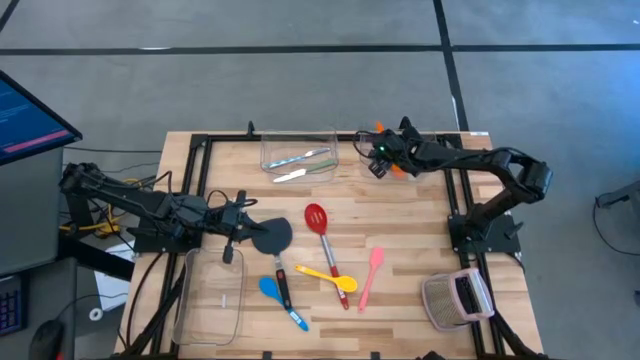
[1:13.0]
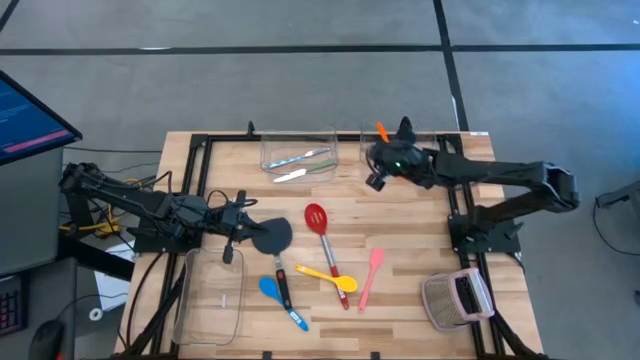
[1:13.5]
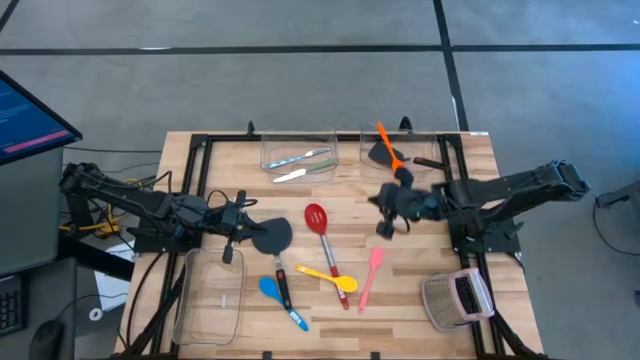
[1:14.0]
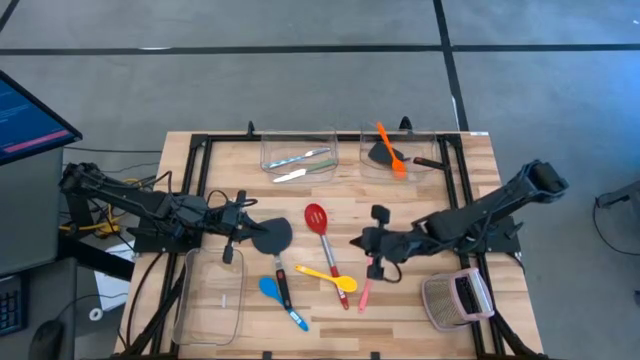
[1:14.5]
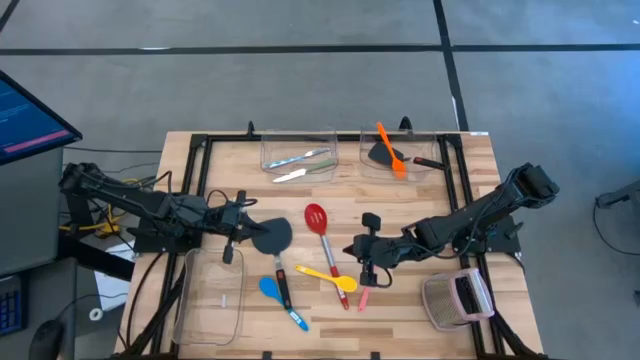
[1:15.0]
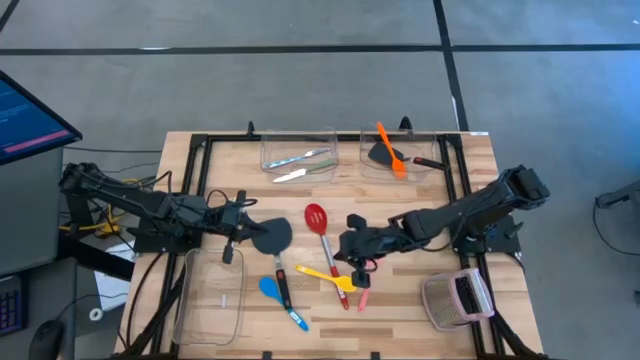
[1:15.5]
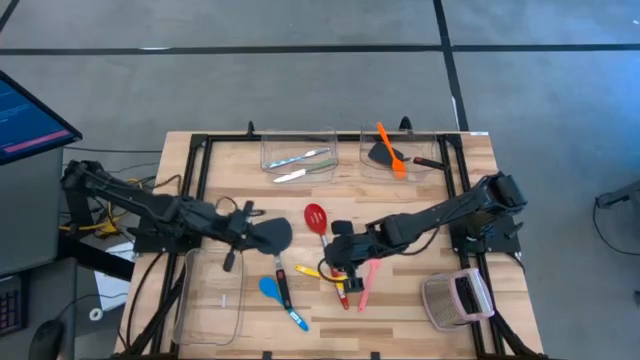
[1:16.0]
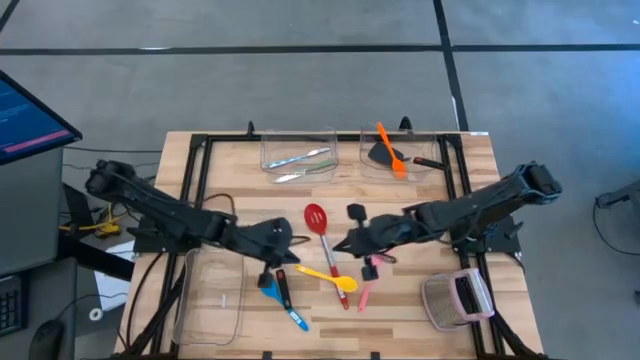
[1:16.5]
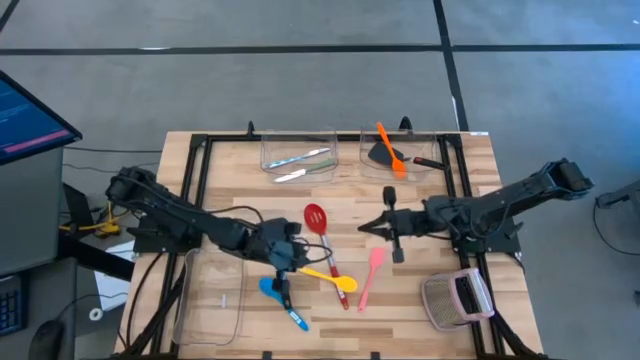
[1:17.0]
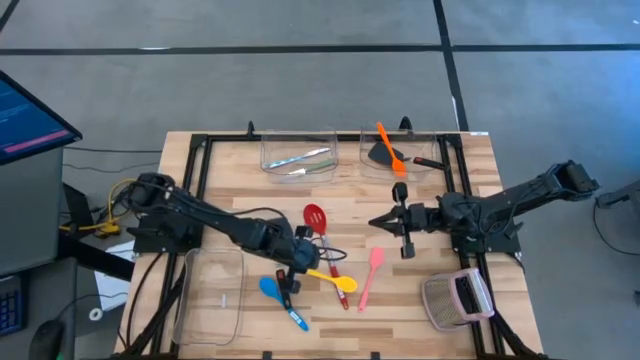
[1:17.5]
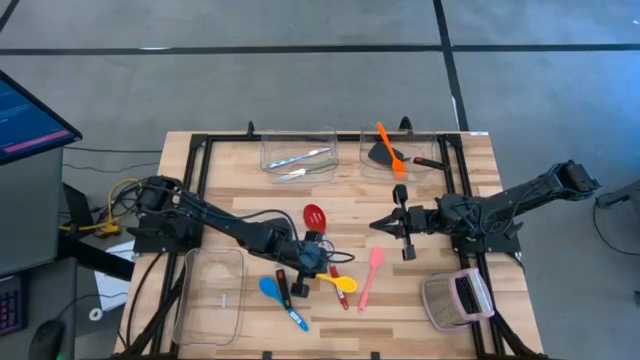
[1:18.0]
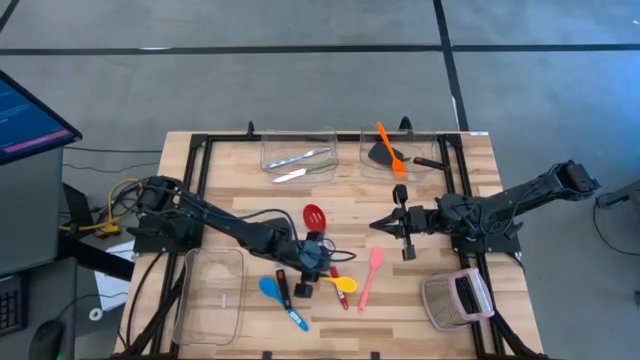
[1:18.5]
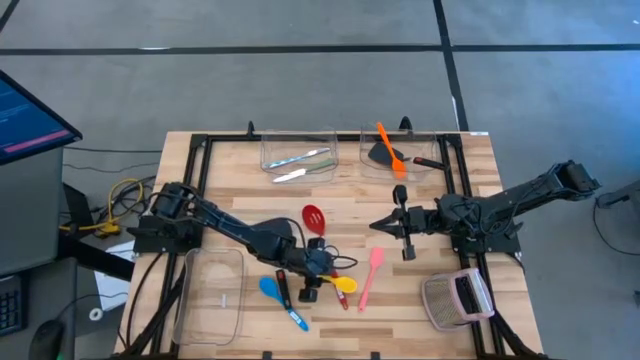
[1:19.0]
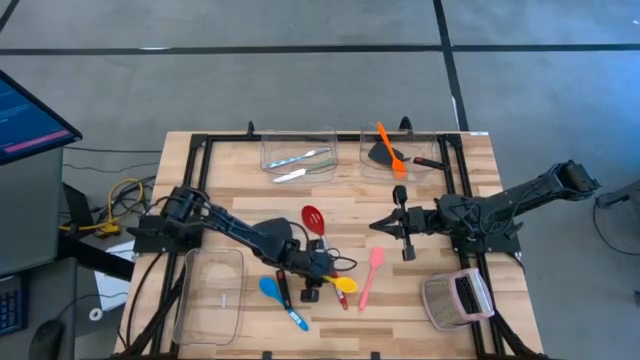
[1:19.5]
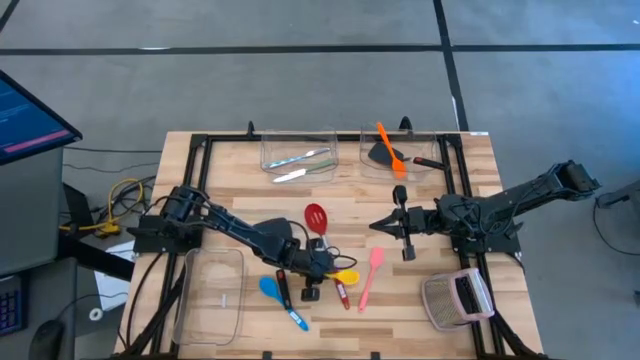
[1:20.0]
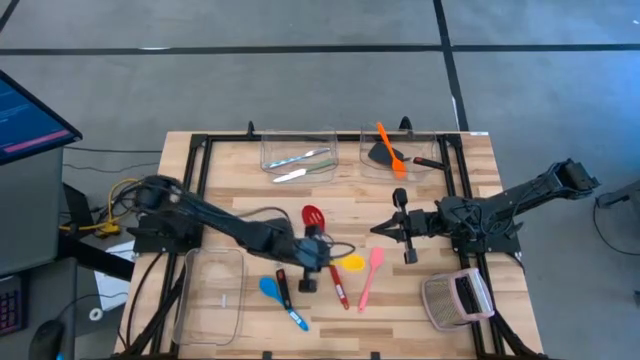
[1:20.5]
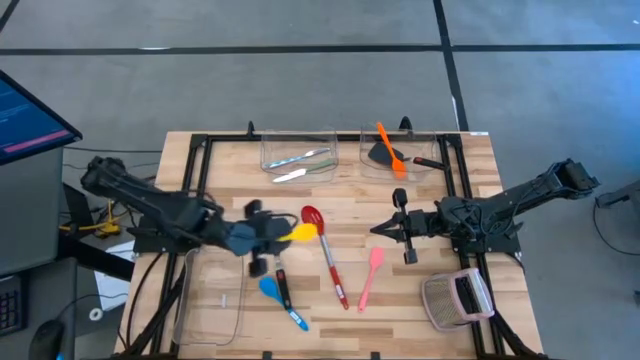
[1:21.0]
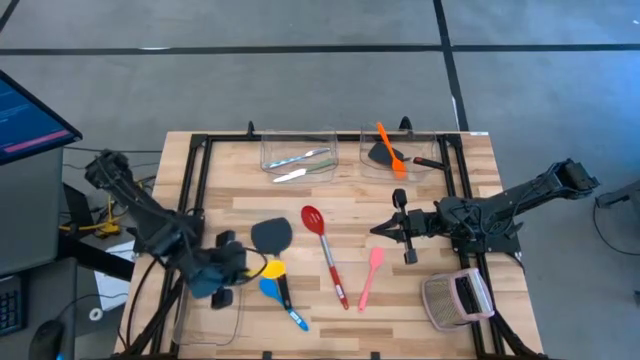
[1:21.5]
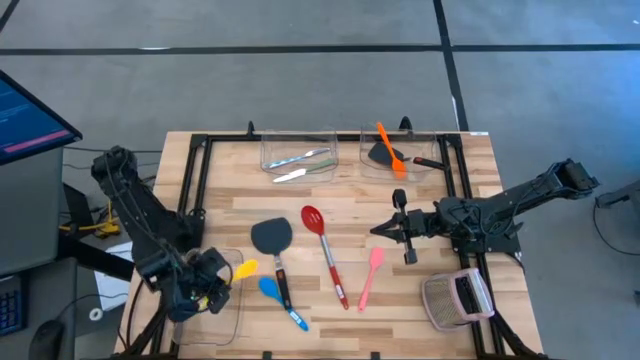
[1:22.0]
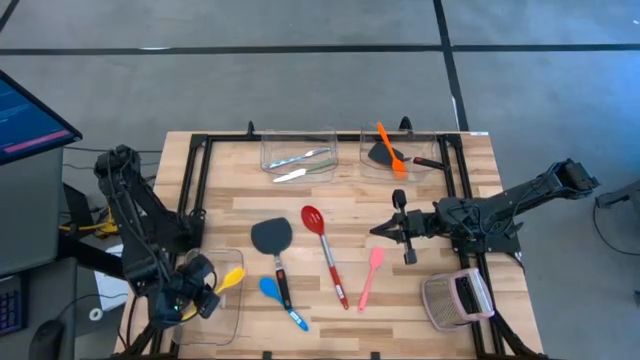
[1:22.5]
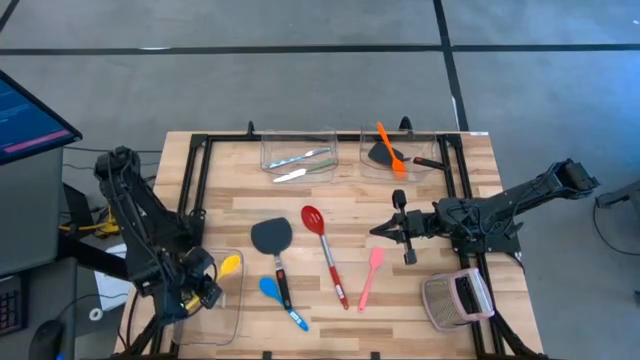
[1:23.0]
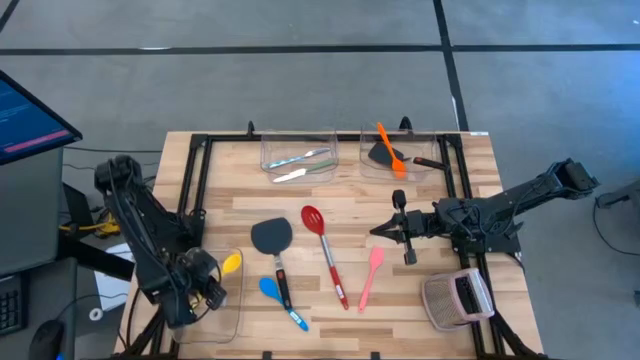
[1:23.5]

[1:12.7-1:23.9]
Task: Pick & Place Kitchen Items
Put the yellow serving spoon into the bottom transparent bin

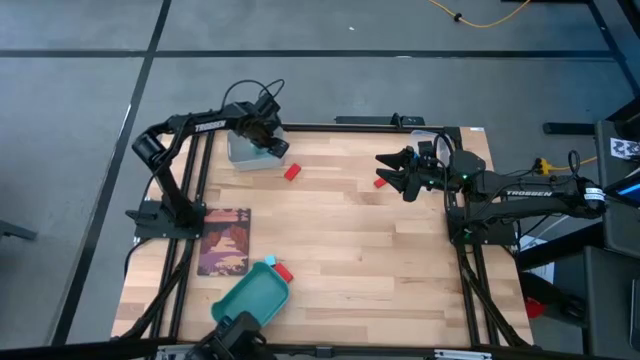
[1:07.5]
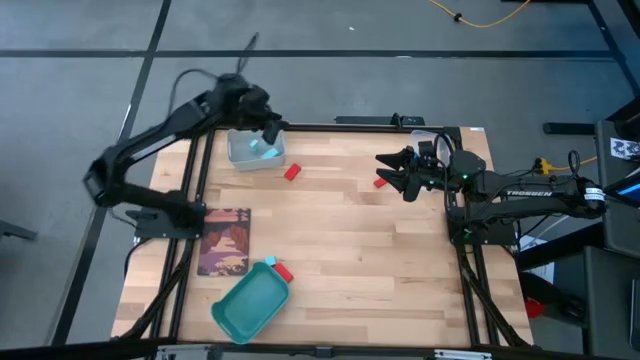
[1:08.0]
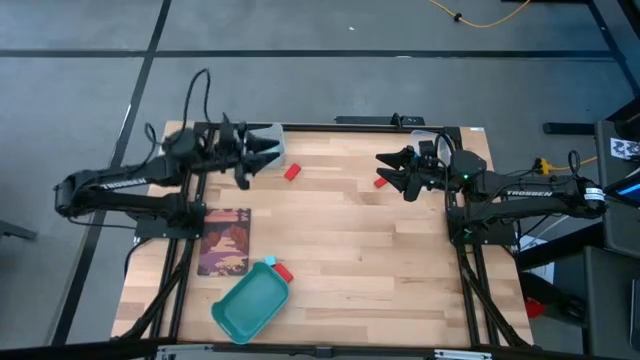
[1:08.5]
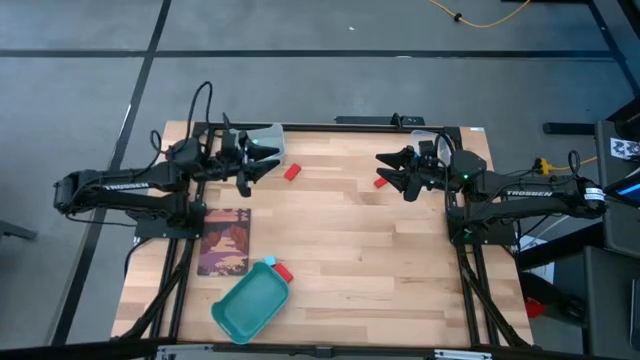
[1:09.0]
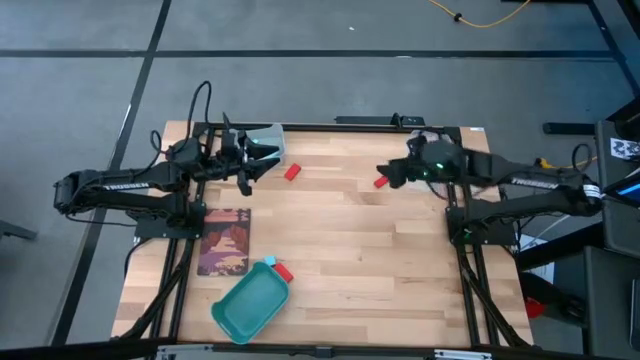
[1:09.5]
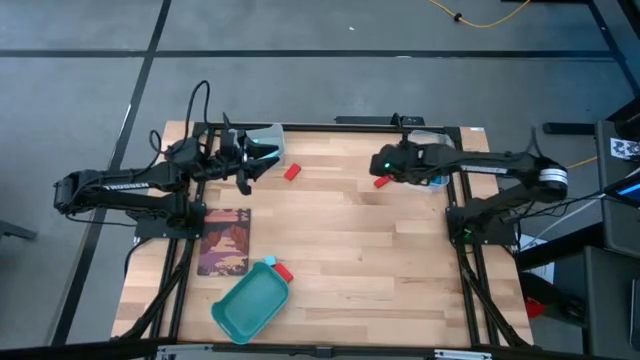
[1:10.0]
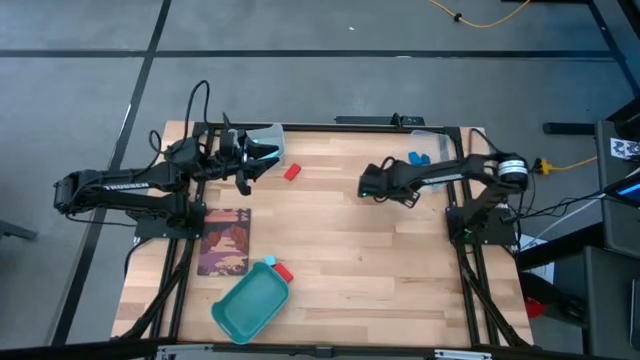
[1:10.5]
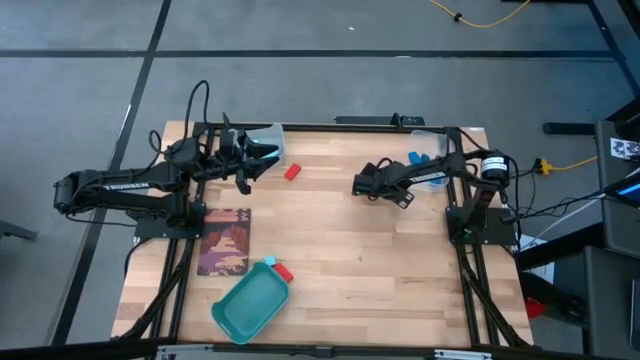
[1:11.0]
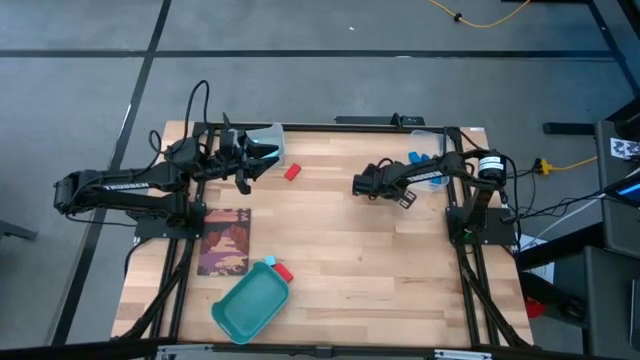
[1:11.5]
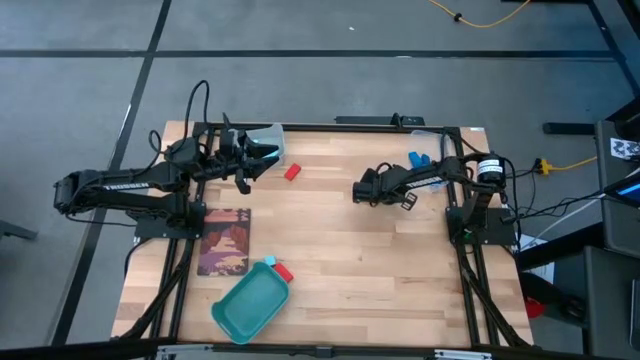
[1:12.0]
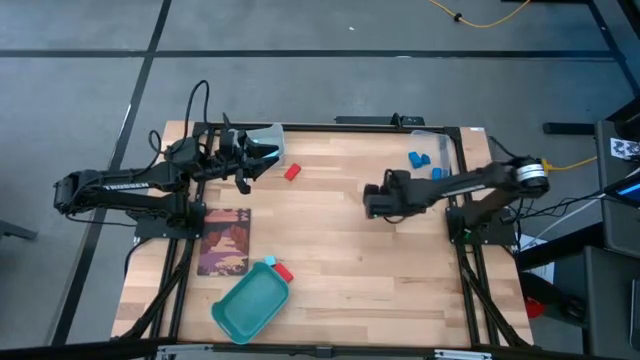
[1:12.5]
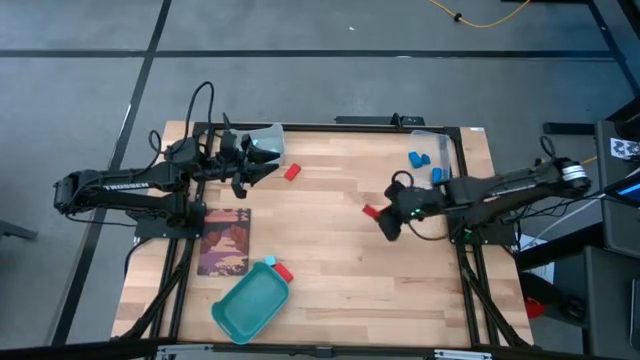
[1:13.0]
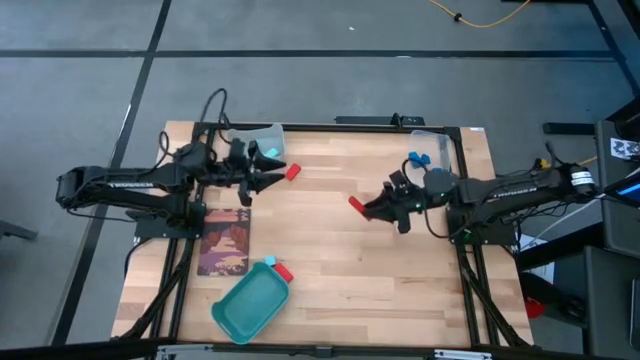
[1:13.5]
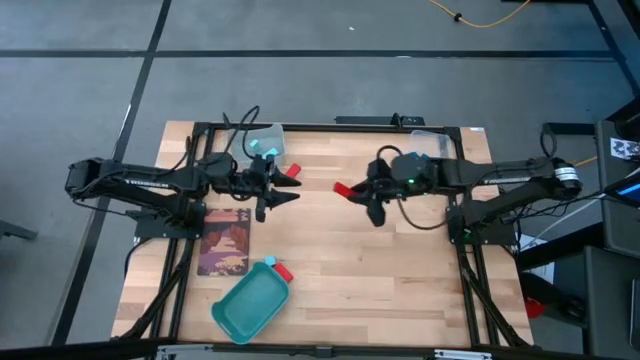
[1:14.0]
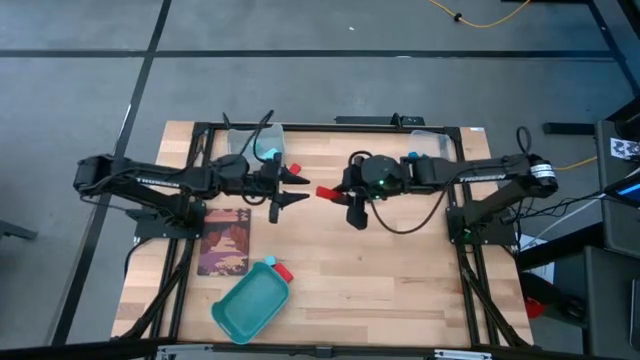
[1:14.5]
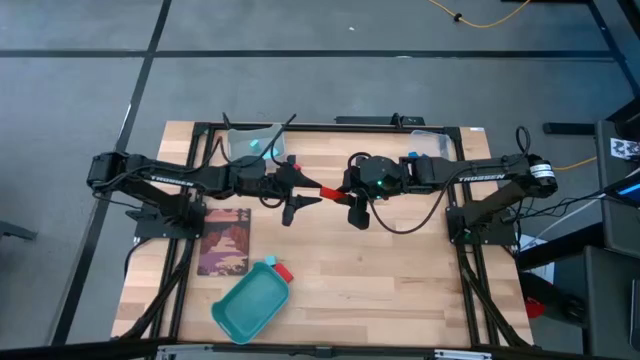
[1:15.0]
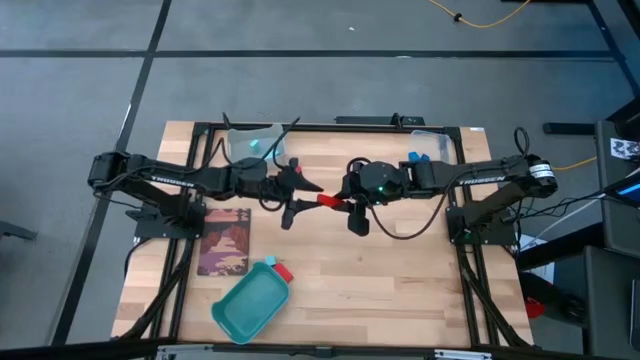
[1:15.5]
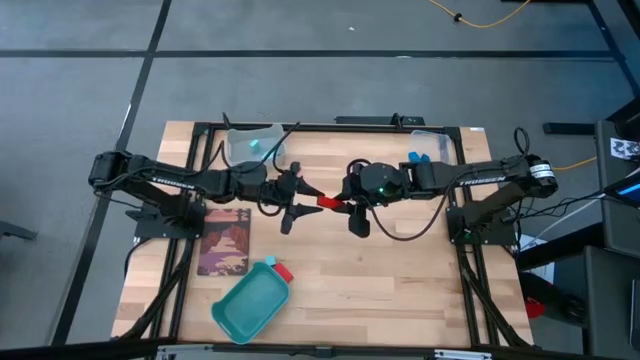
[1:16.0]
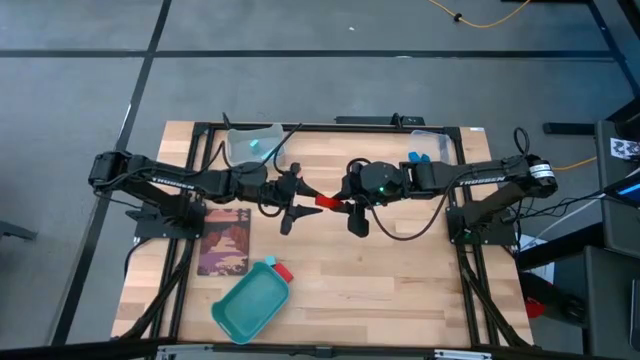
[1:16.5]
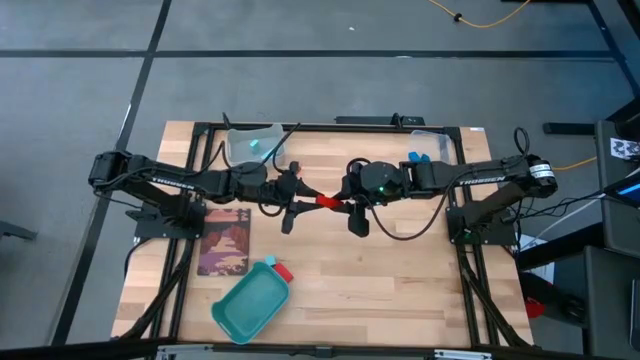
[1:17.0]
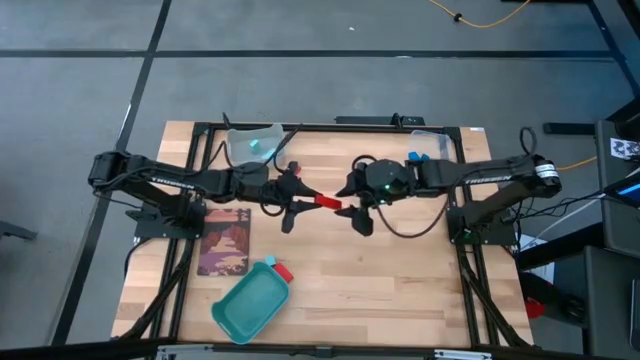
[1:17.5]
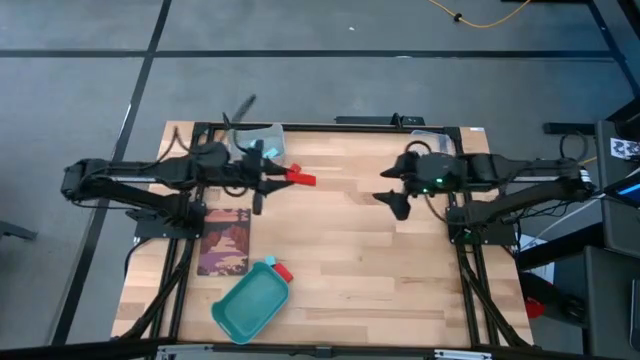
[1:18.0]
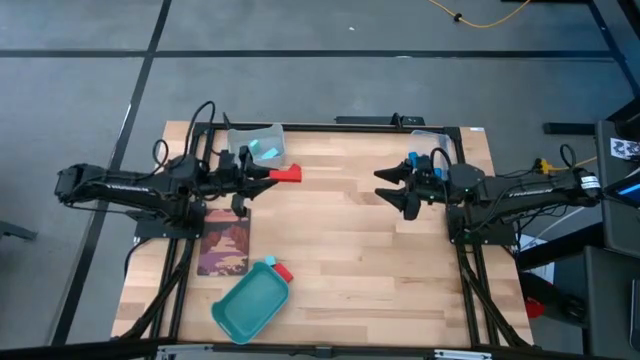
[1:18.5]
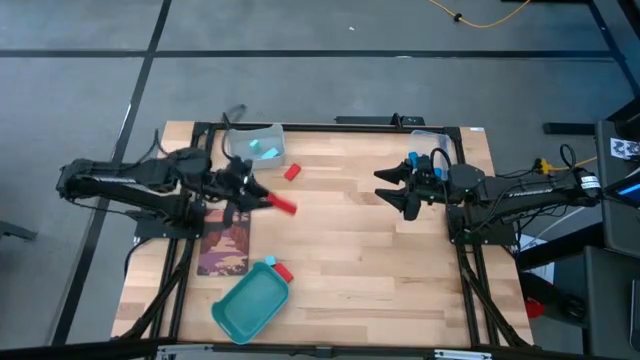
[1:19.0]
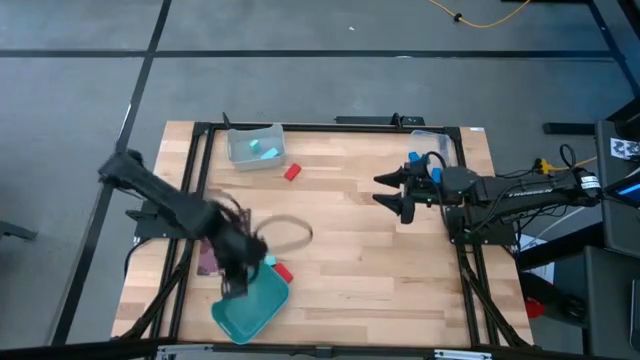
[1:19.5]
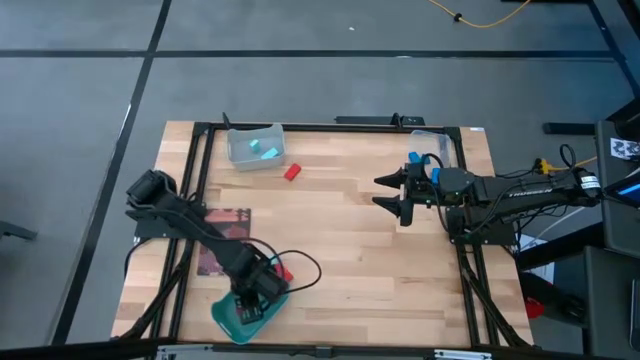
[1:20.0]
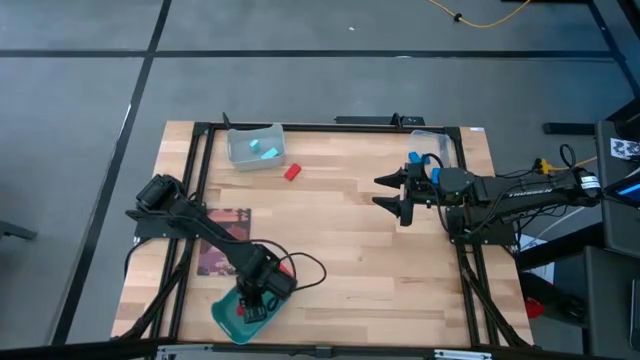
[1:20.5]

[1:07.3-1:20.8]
Task: Sort & place blocks by color
Put the top right red block into the green bin
